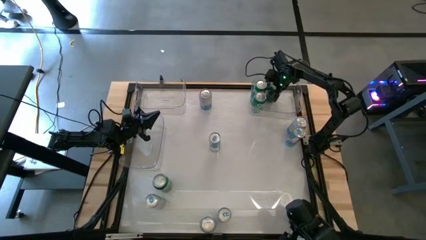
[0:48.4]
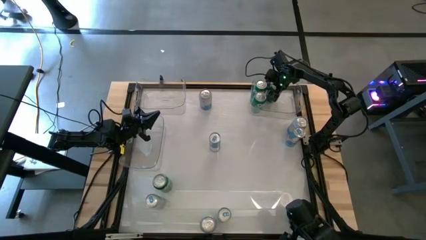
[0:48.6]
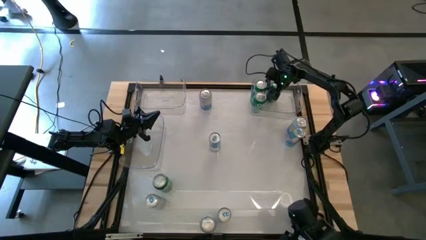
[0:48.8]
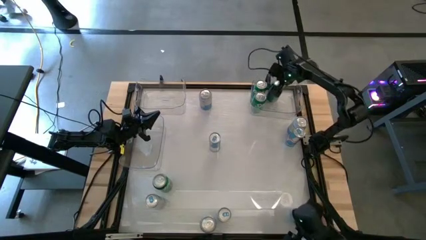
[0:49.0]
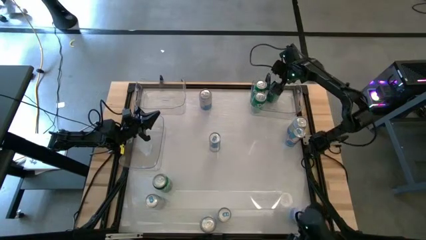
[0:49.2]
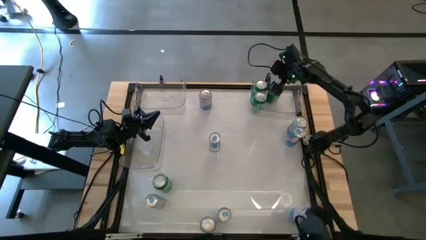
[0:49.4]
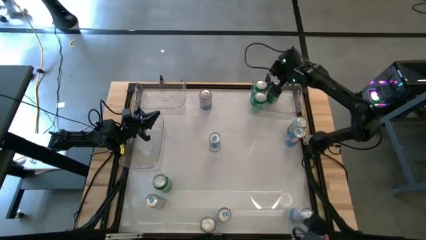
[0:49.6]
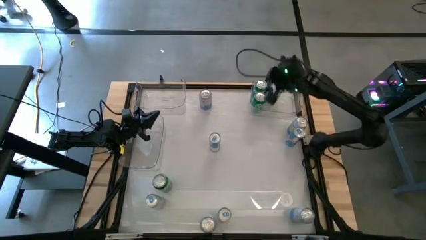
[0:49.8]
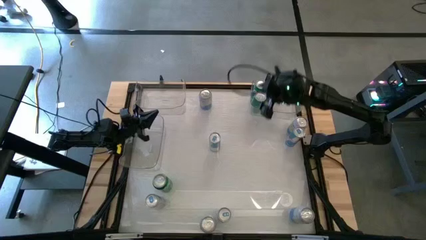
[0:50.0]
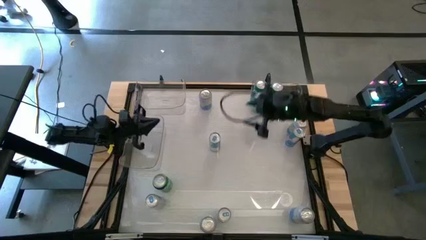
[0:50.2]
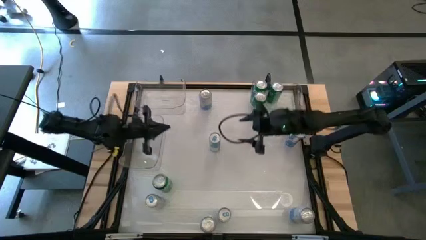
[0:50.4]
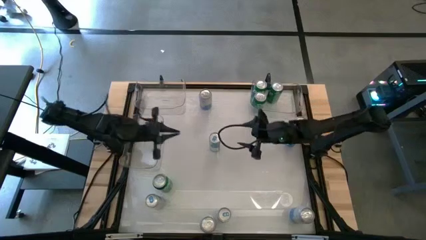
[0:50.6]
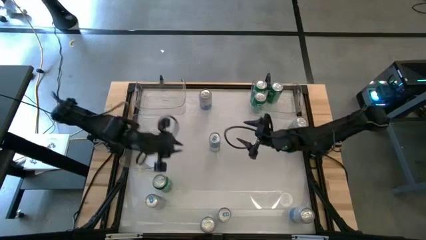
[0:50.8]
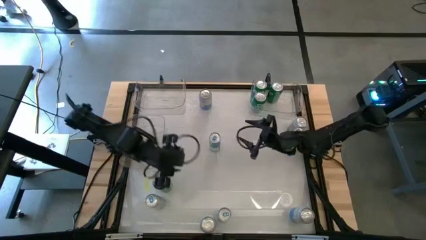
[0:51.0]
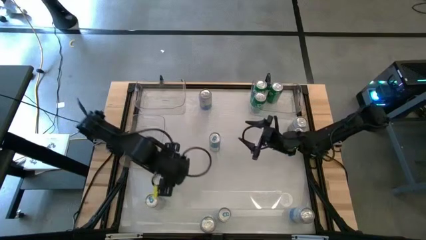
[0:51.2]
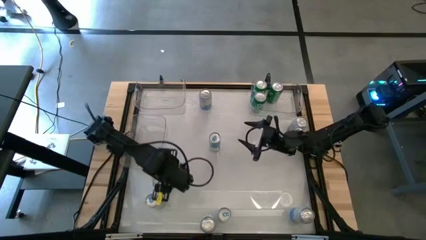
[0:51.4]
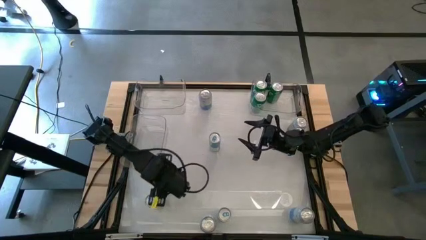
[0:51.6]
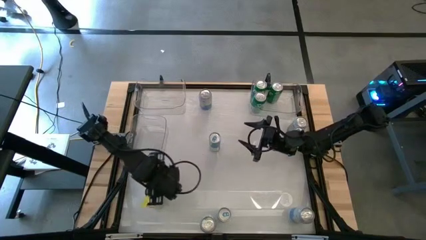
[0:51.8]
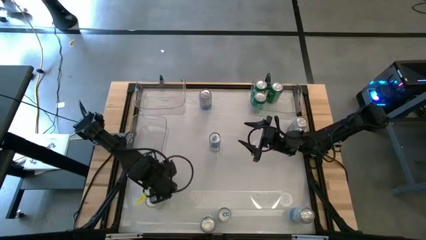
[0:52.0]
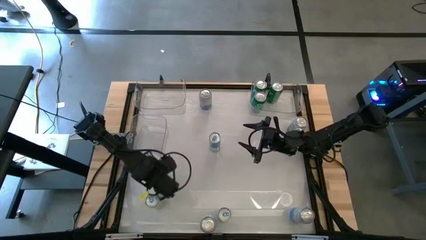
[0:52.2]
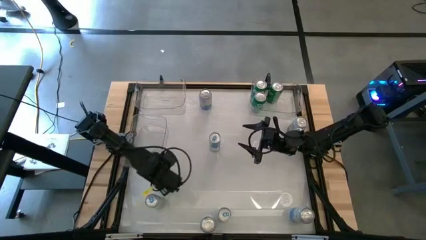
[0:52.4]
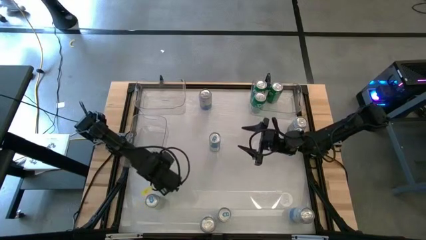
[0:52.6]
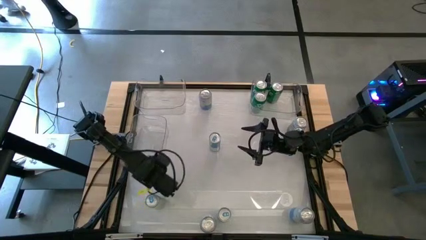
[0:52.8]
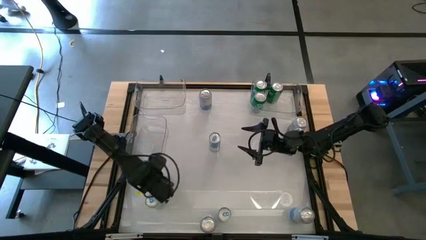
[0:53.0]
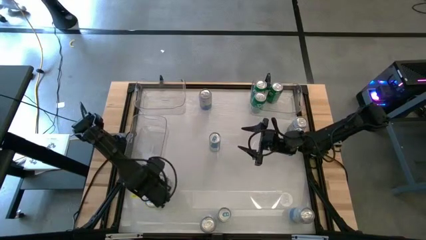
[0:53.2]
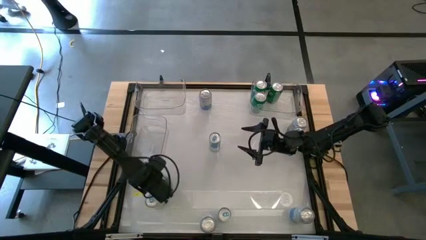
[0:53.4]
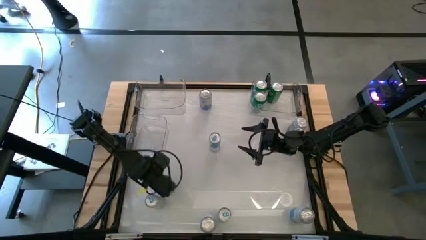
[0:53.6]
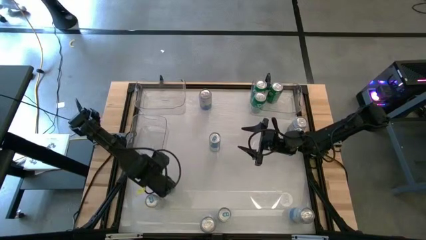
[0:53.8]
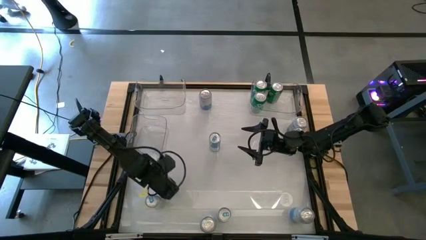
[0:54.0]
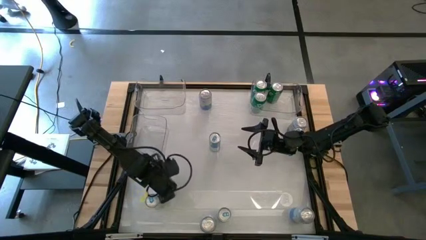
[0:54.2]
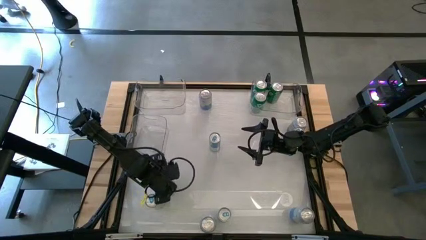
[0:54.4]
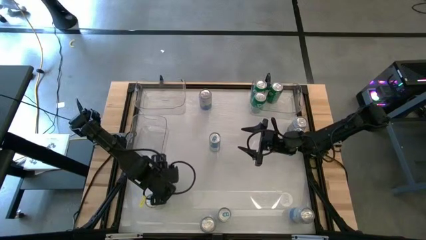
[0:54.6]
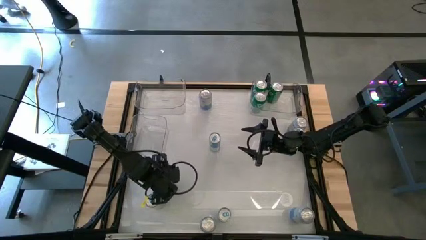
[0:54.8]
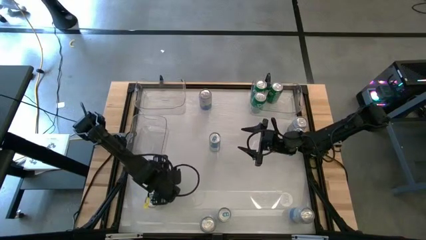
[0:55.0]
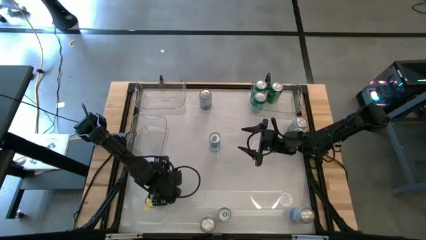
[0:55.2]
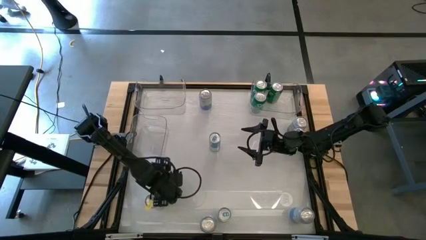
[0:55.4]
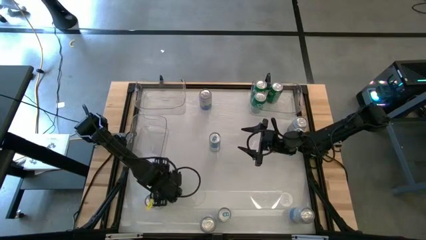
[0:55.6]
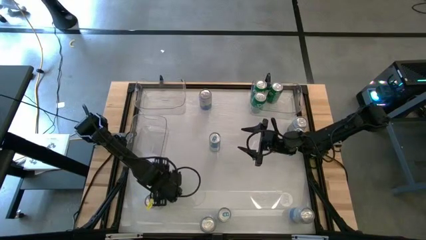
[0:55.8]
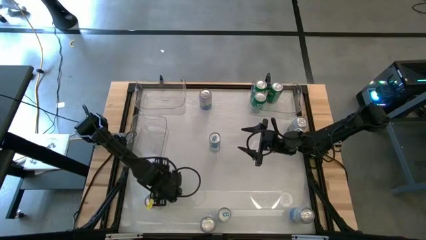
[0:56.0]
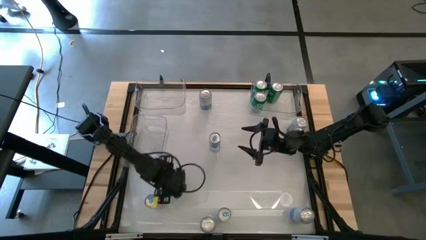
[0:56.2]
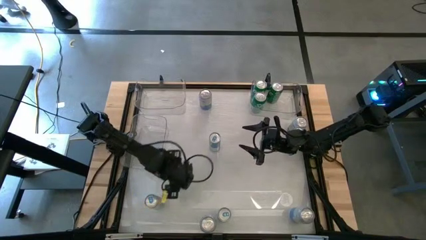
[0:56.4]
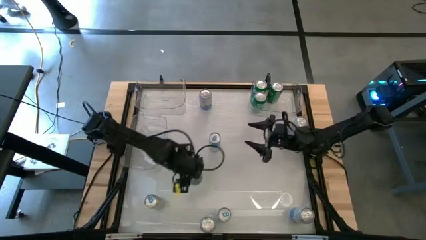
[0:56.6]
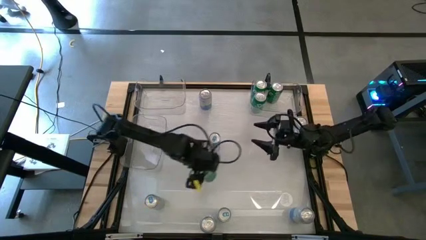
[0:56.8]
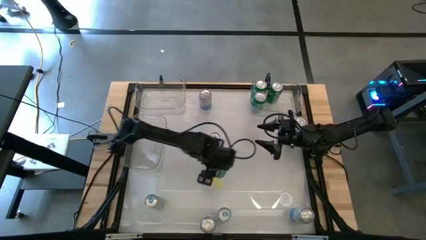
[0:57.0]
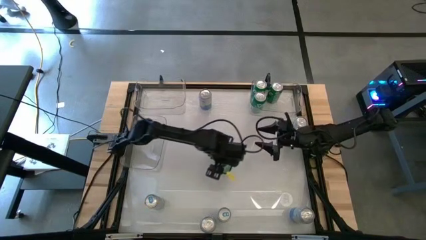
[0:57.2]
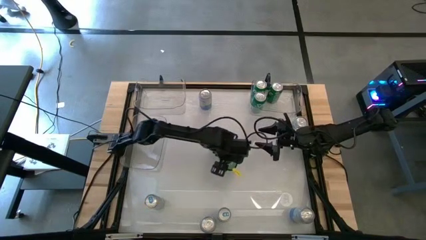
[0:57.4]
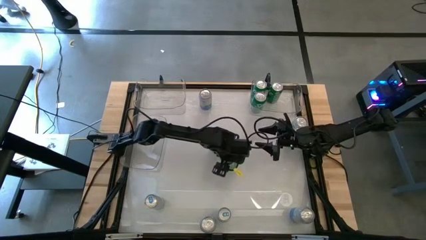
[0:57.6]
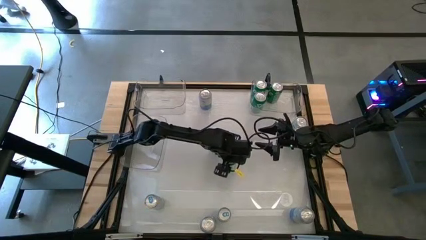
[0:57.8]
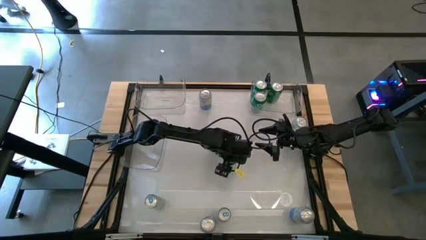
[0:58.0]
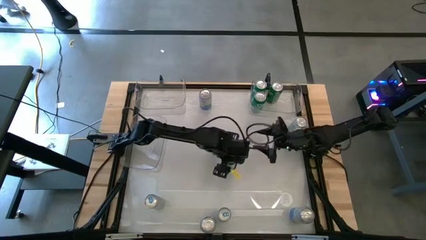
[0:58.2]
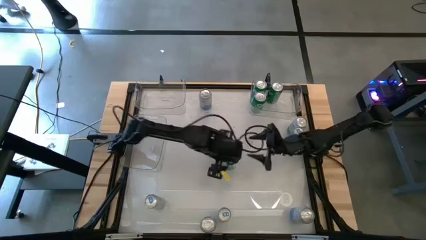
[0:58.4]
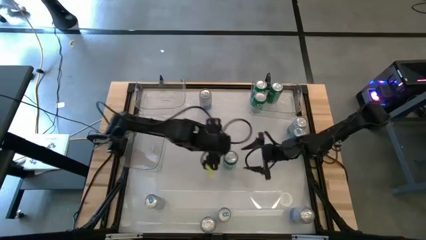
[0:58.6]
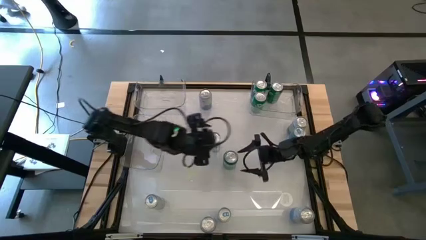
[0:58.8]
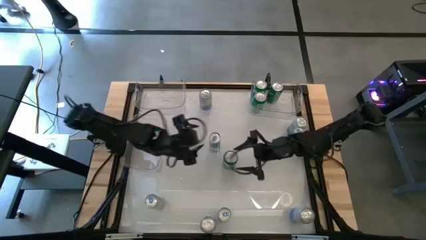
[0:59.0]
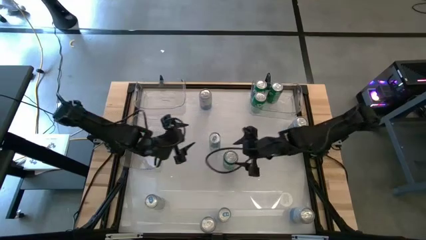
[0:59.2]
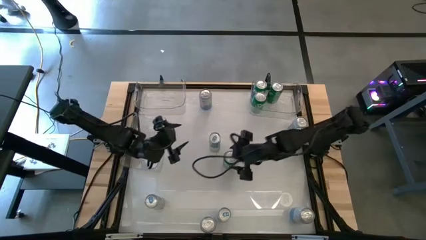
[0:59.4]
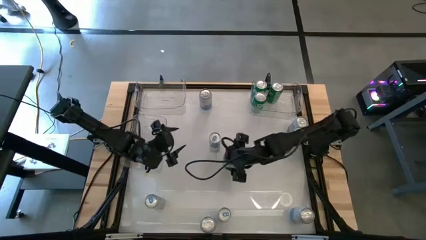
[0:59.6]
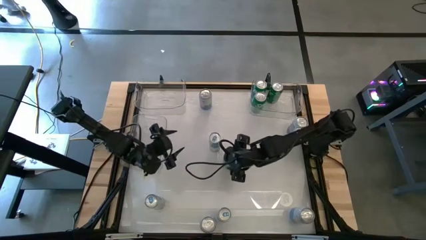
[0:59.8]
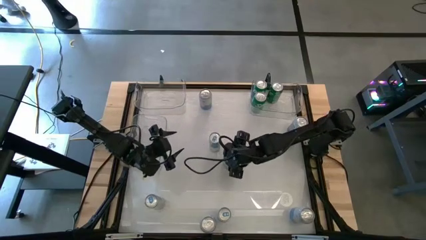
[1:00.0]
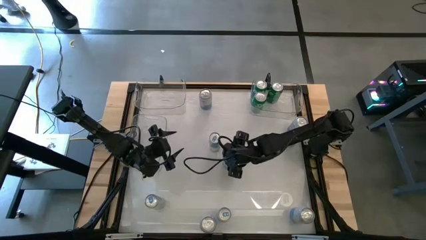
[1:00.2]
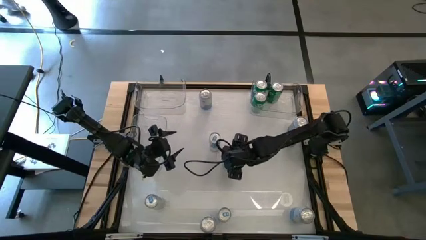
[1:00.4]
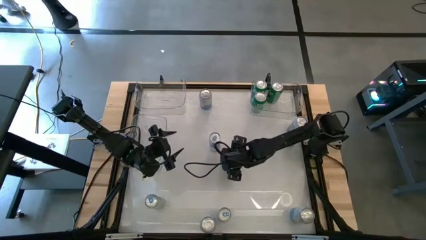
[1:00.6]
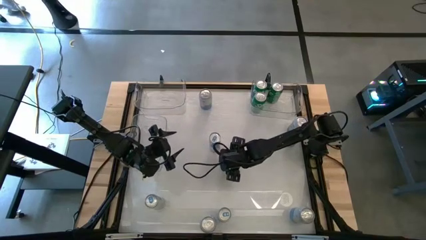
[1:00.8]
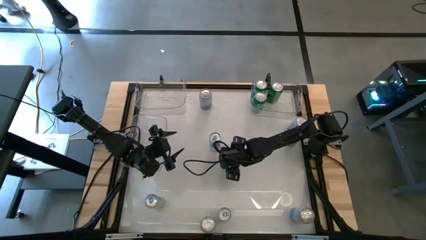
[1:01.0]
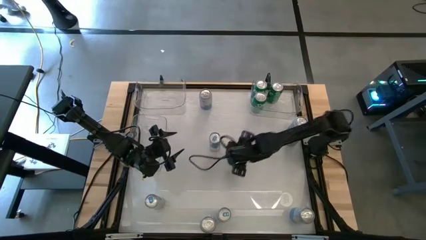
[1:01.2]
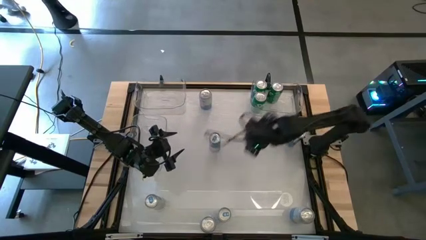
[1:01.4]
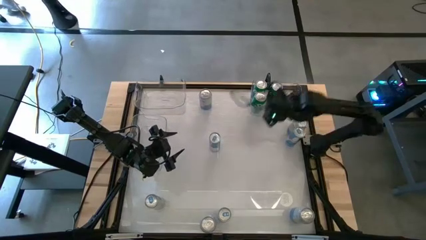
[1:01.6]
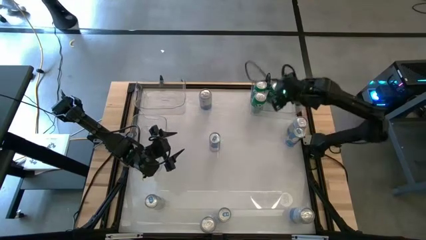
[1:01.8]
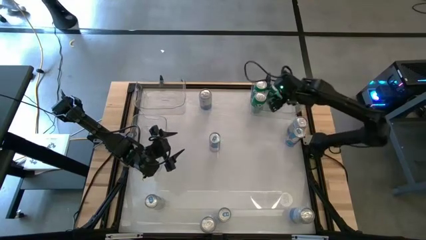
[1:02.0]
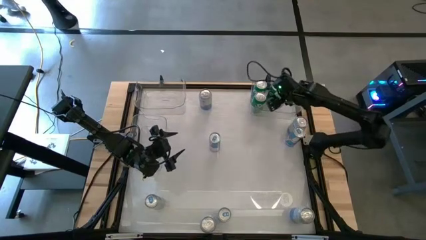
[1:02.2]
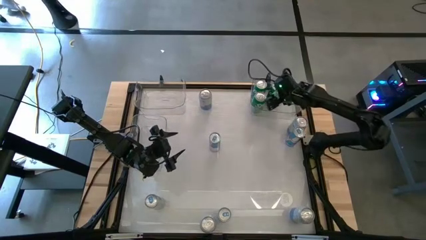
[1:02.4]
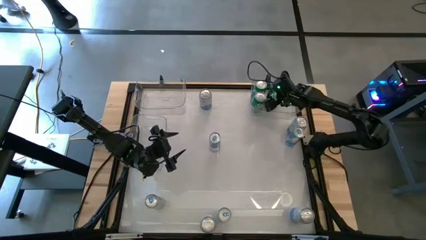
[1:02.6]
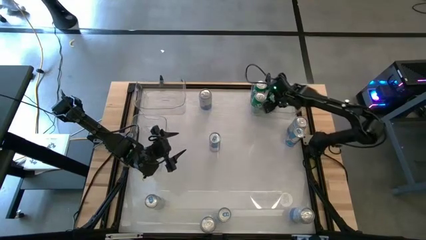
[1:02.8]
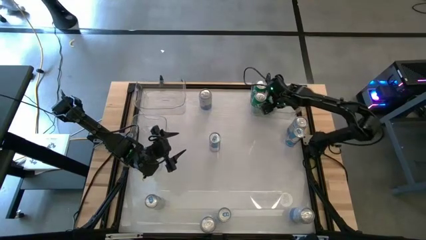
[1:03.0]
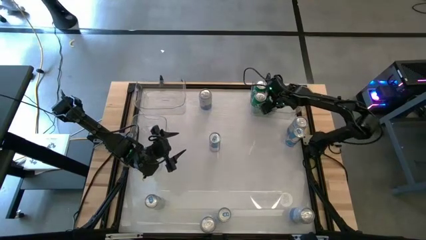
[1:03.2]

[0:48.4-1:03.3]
Task: Sort soda cans
Put the green soda can into the top right transparent bin

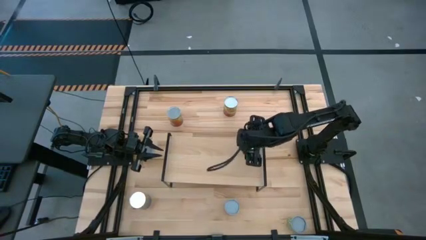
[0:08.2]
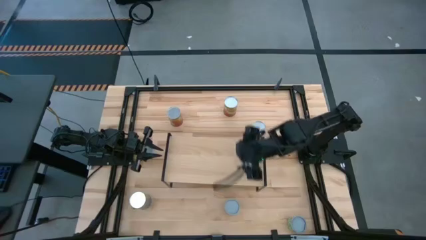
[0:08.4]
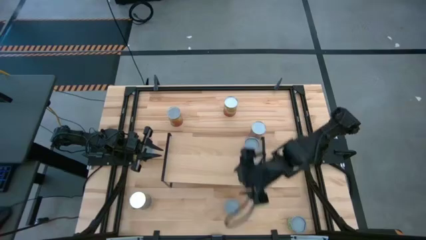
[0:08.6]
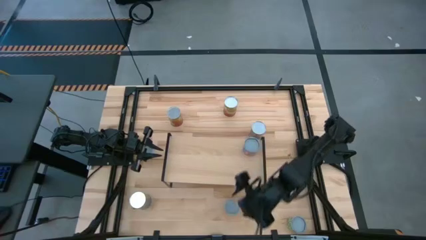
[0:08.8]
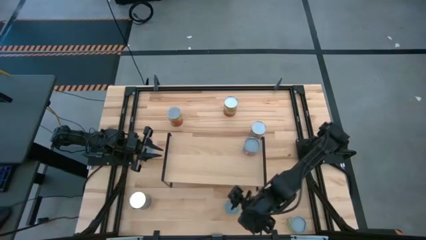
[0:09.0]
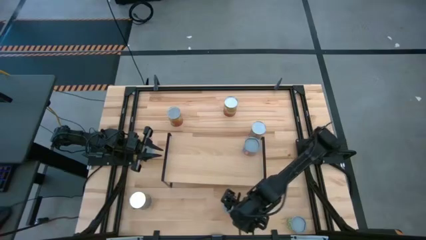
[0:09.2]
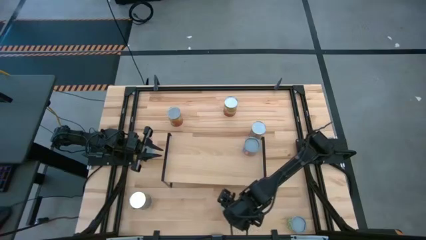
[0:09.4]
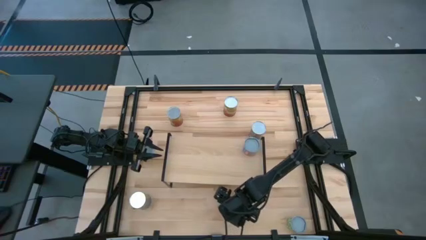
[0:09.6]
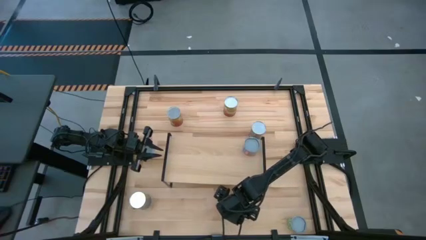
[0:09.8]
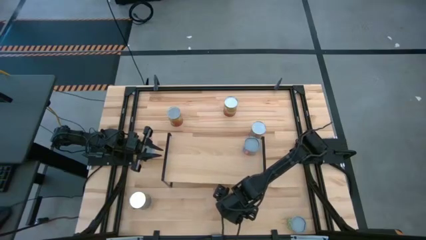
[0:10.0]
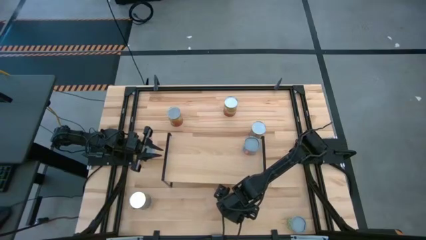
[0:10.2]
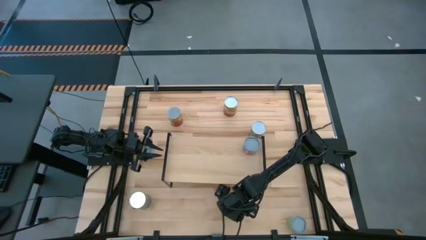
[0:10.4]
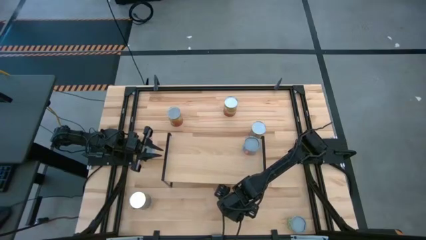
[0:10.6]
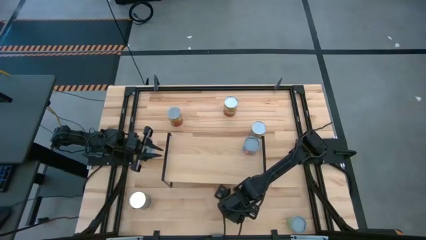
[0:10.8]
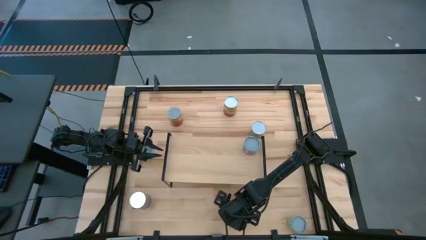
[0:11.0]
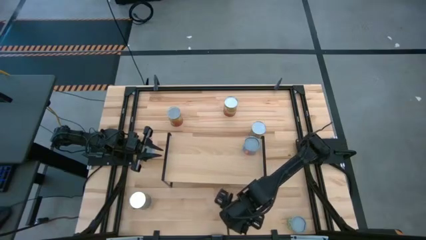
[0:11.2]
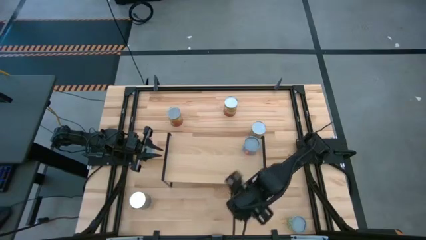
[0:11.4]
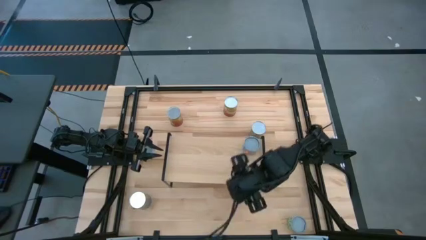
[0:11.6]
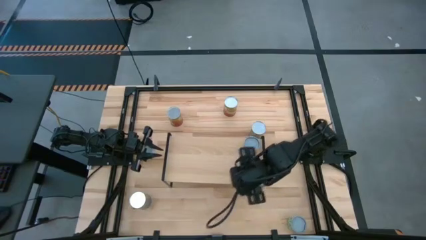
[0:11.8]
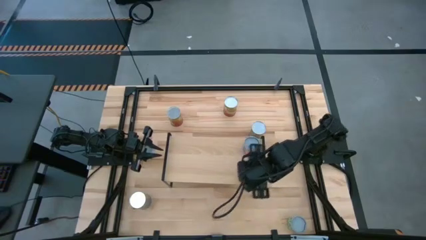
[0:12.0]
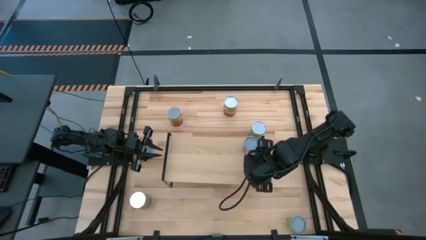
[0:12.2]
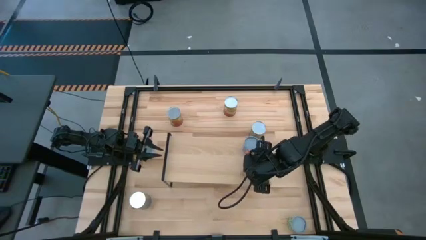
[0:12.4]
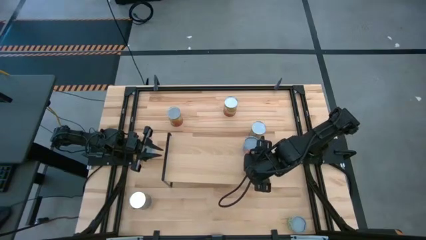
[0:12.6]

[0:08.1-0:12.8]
Task: Pick and place cans onto a shelf
Put the small canned oranges on the shelf
